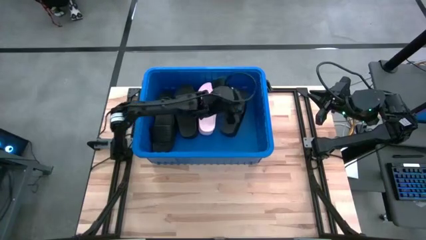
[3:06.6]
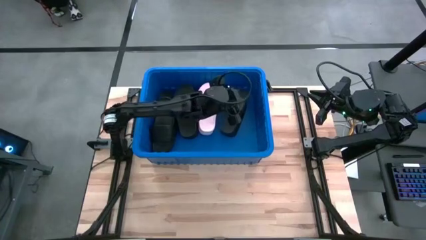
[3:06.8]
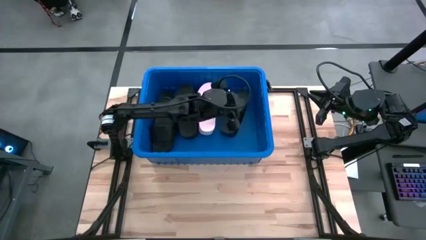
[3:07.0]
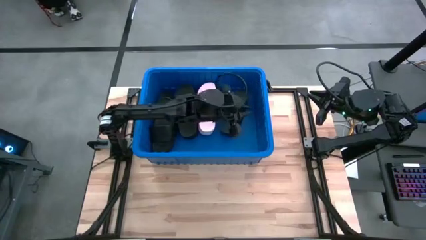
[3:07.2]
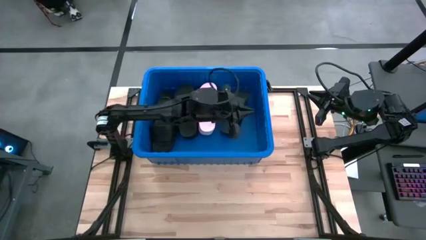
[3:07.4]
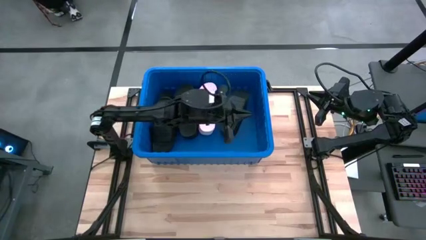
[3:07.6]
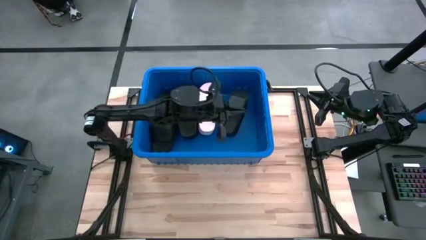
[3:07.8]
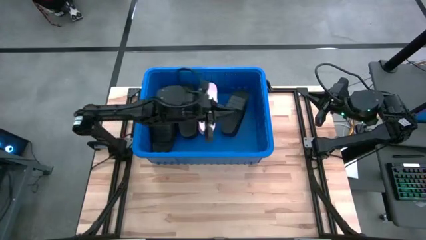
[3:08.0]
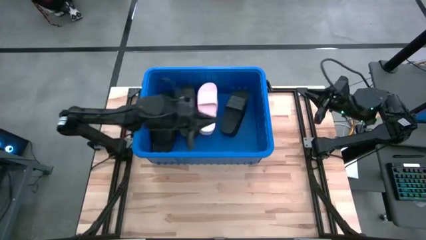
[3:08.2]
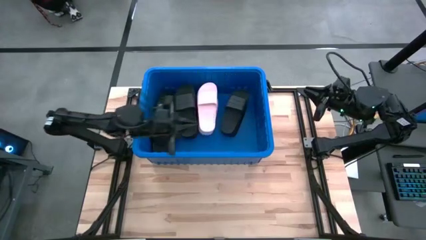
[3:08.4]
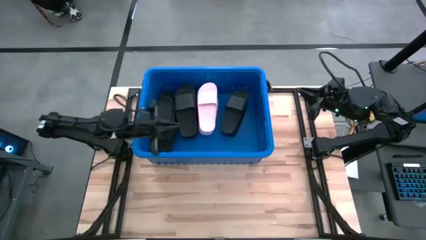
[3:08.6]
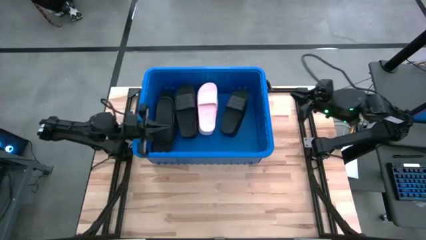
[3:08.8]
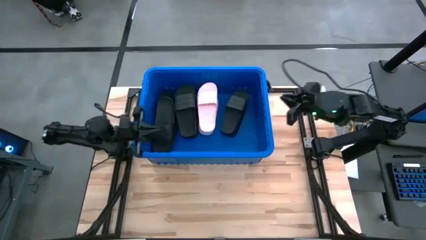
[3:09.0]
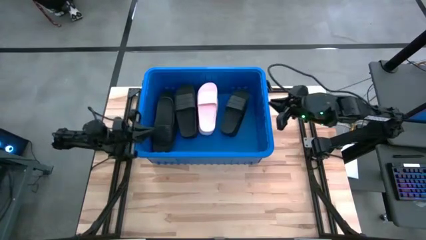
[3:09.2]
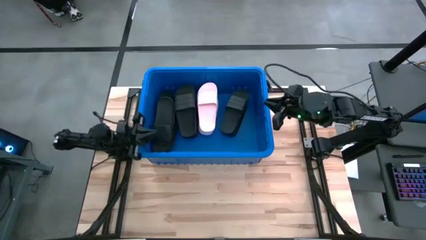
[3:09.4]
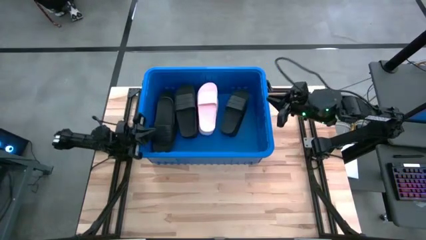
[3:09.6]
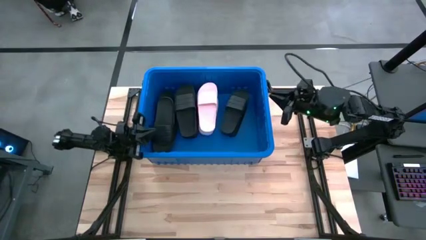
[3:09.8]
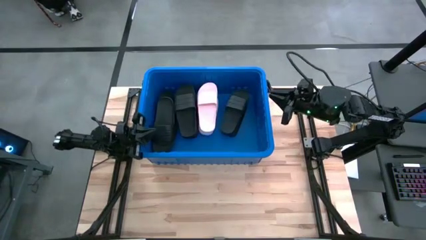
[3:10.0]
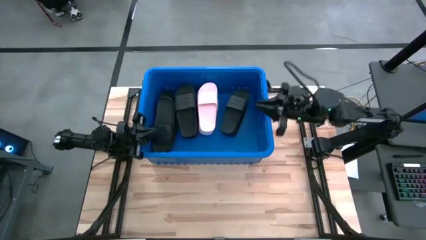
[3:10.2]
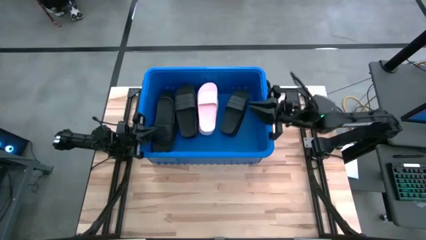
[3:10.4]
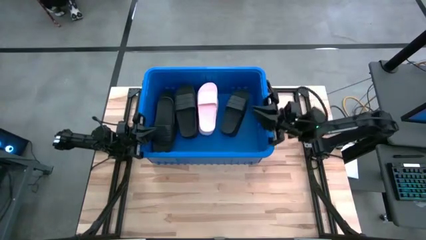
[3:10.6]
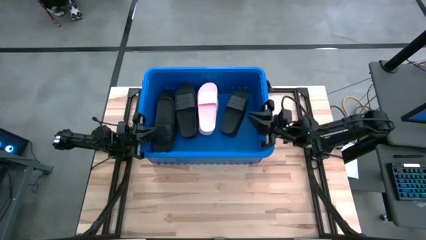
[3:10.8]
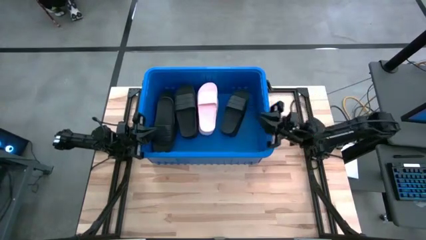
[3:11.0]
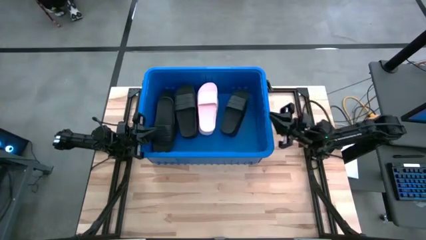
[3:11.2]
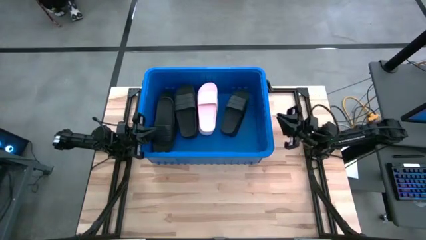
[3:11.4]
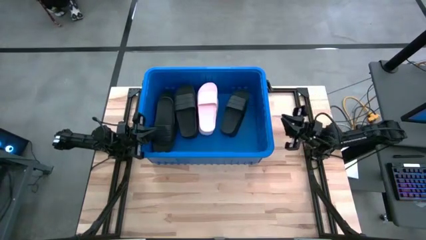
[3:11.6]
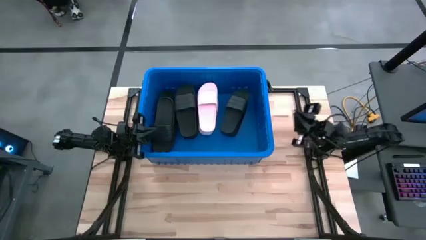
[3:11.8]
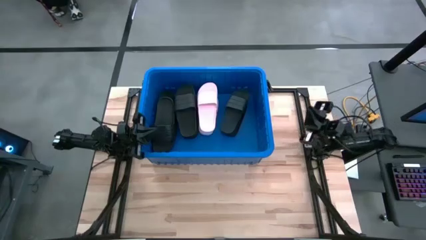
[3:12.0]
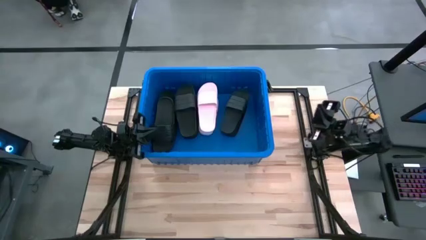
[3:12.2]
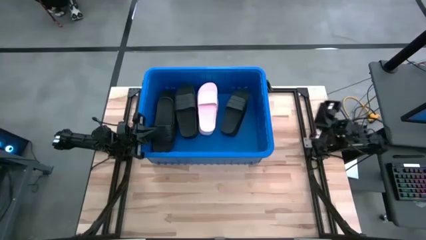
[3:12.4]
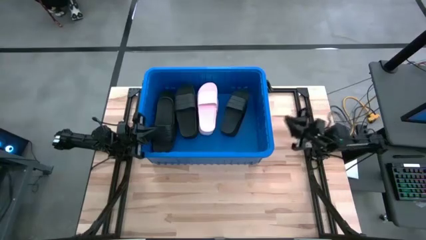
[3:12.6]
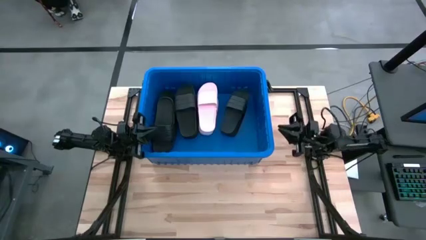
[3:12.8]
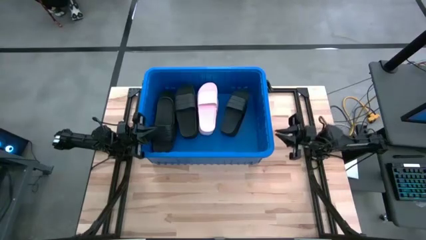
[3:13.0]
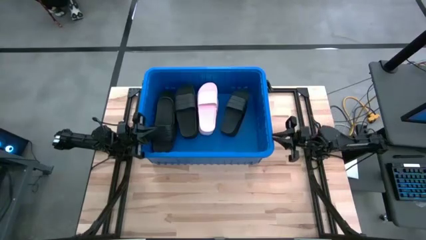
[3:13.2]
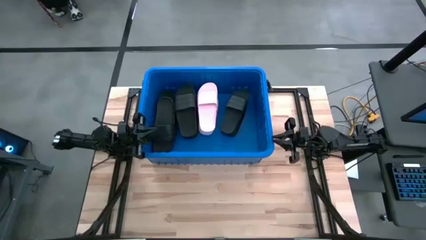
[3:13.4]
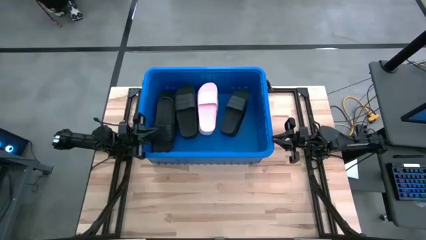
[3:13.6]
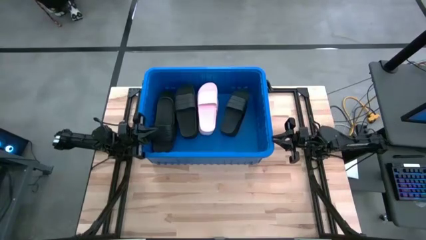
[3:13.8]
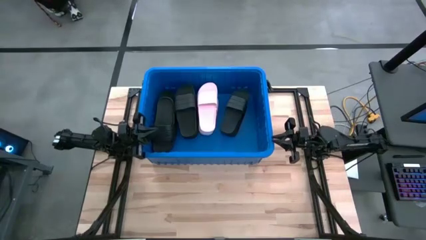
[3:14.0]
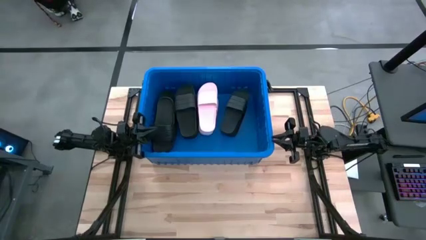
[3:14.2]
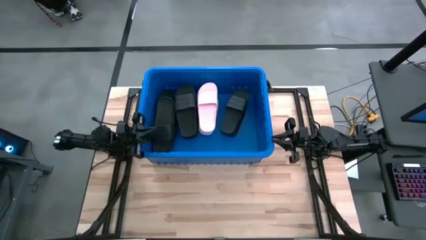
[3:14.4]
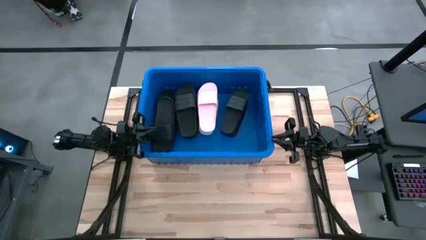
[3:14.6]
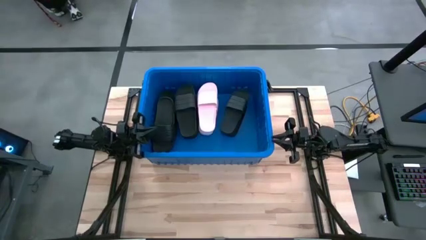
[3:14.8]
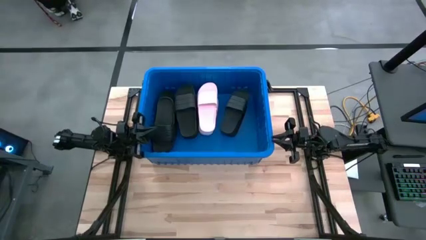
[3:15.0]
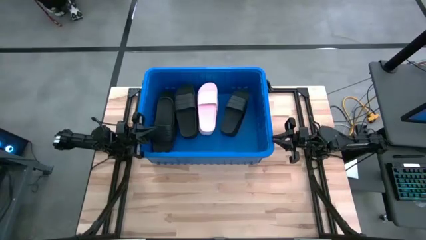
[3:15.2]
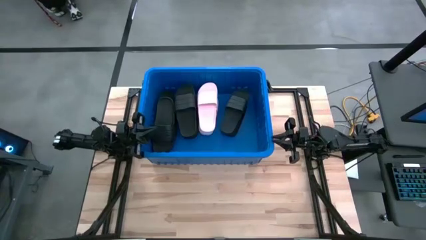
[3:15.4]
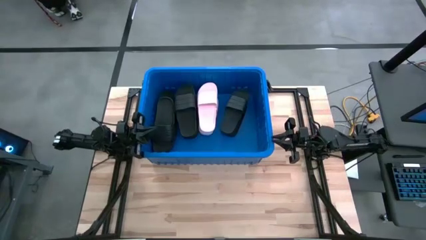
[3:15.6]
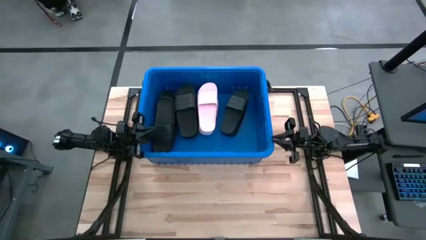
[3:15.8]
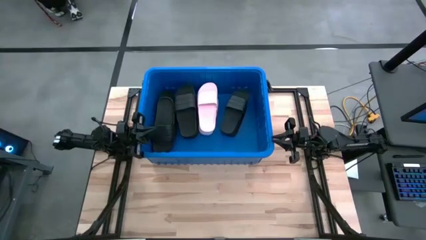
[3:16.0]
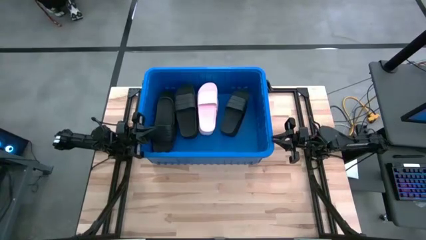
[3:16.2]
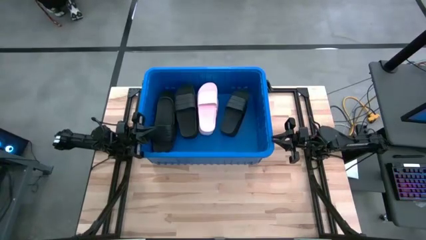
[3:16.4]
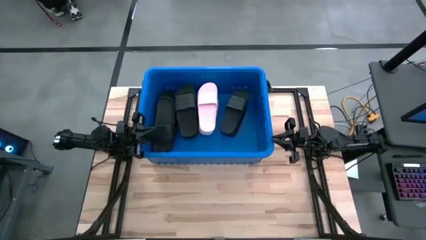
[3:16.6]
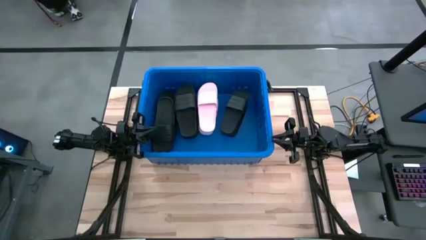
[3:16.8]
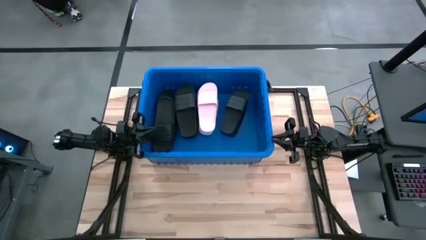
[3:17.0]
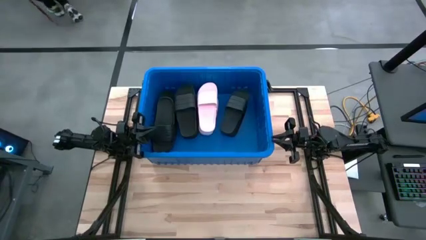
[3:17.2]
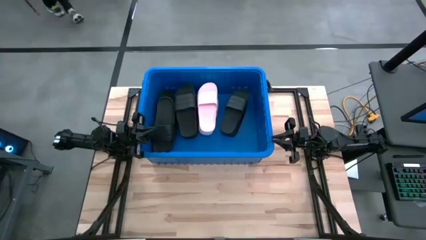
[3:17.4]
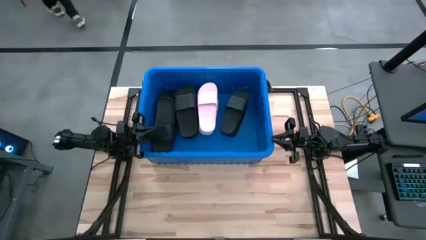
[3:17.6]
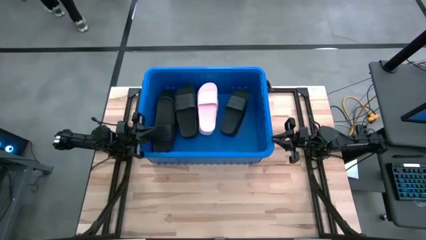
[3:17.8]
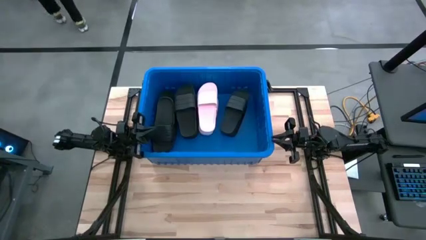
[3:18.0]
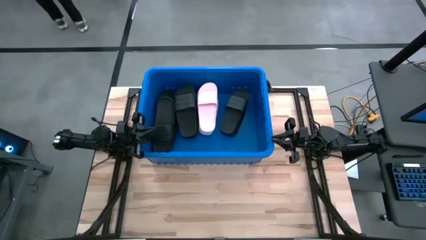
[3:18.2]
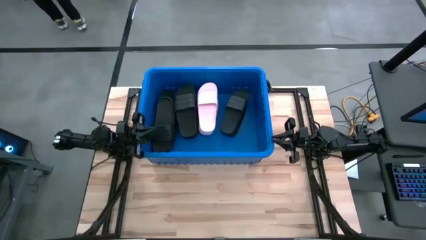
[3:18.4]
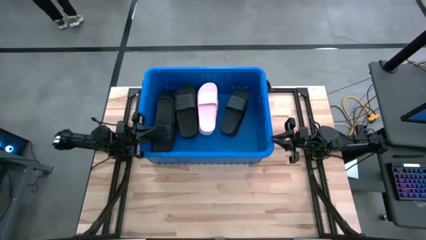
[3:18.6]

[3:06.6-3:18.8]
Task: Pick and place slides into bin
Return to Home Position

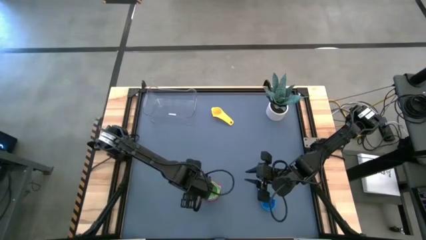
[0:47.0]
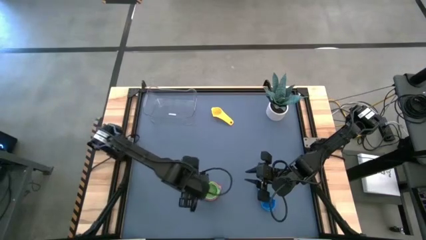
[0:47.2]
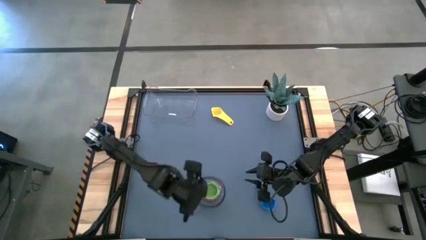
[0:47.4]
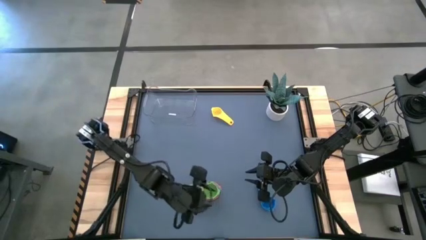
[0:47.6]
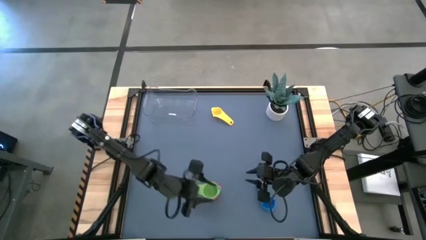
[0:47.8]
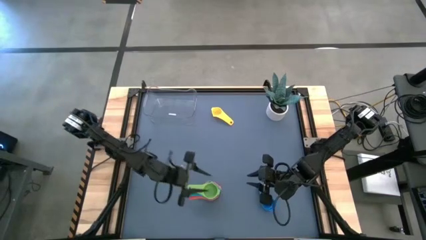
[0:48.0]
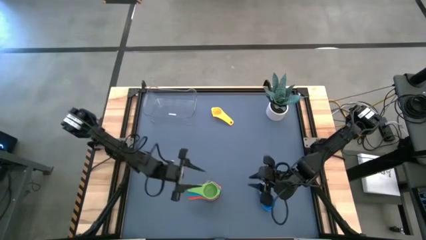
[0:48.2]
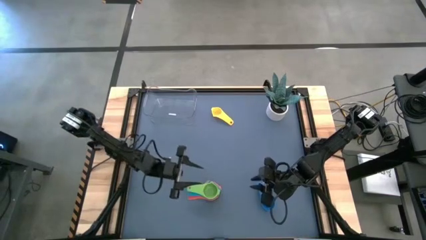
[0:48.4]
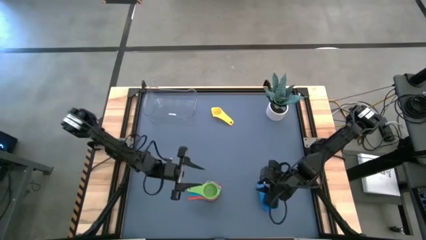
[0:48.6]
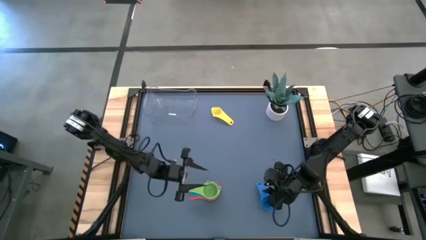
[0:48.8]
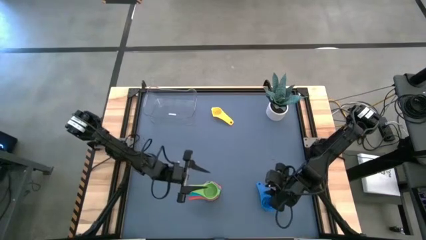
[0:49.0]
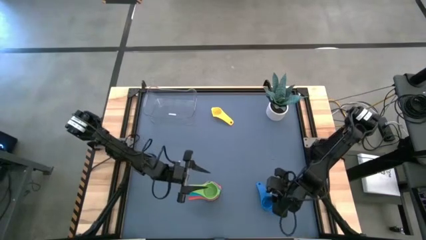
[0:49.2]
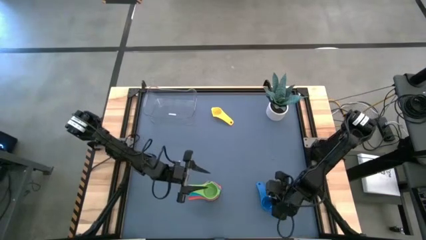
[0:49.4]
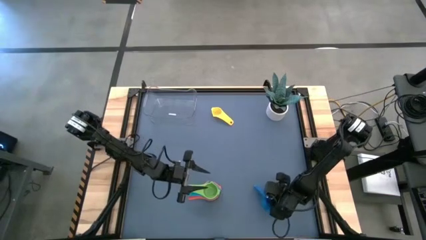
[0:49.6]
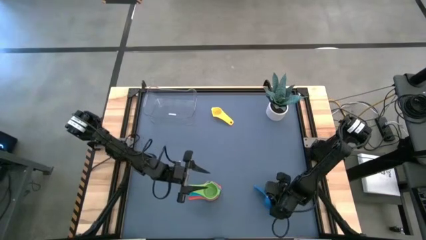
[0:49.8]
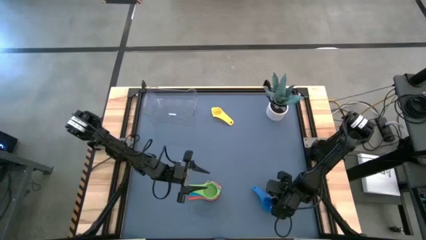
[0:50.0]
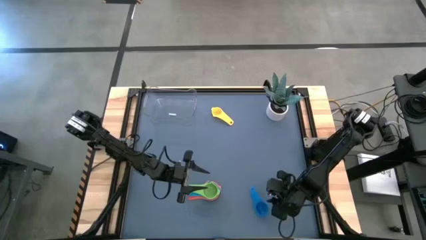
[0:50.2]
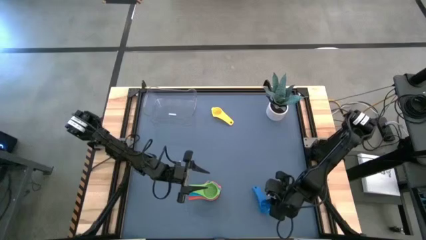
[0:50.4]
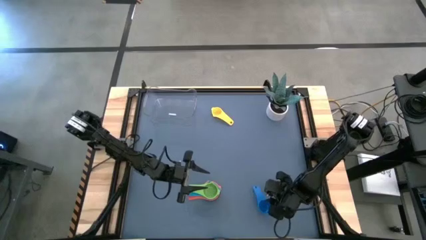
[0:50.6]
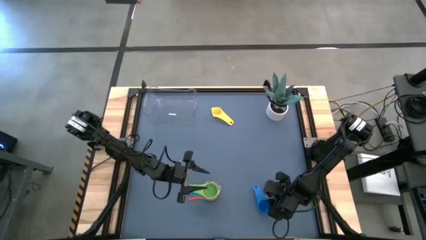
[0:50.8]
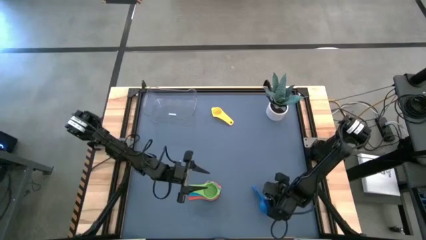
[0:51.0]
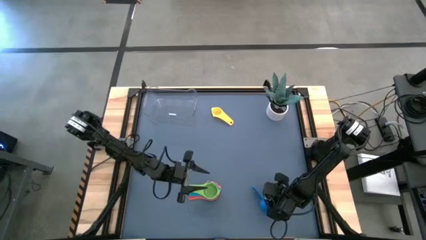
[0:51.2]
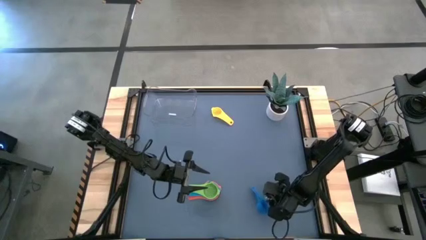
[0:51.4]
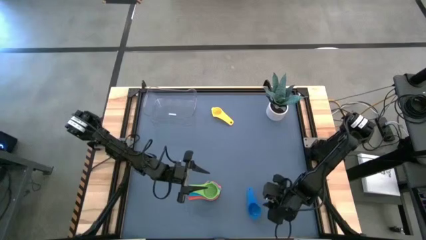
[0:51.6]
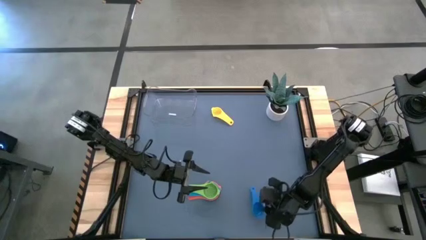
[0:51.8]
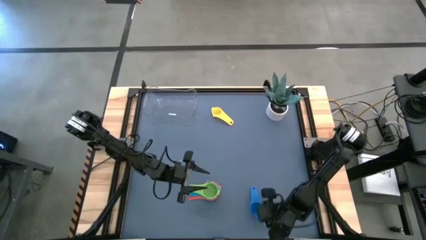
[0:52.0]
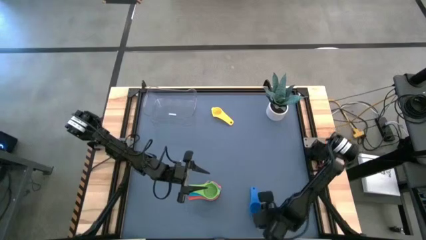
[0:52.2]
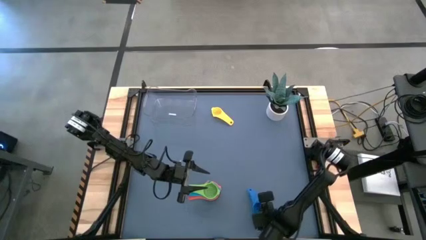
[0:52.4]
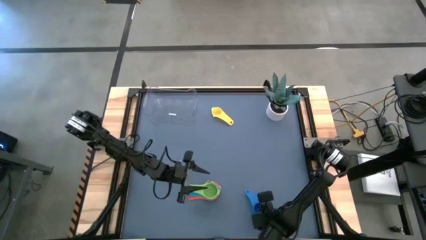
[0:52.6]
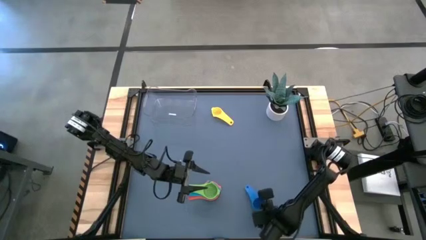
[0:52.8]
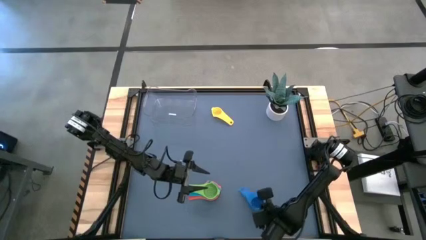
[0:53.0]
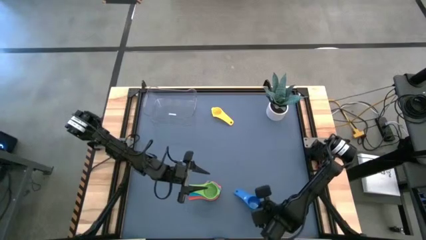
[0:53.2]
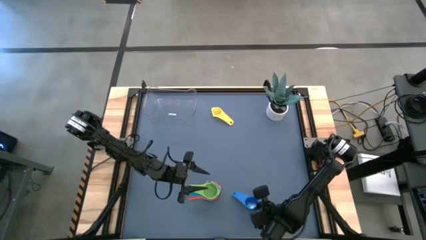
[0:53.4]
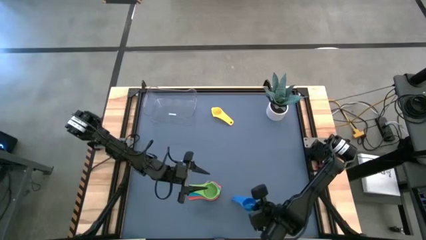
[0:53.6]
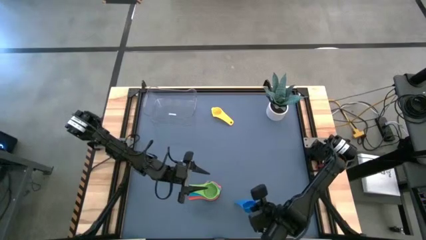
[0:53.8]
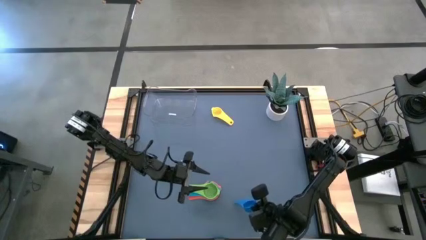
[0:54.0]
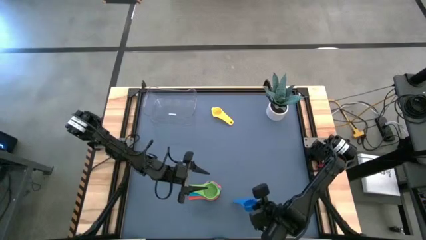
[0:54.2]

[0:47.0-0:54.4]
Task: Nest measuring cups in basket
Stack the blue measuring cup on top of the green measuring cup
